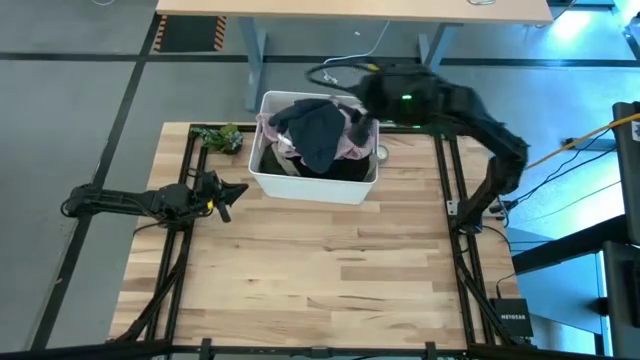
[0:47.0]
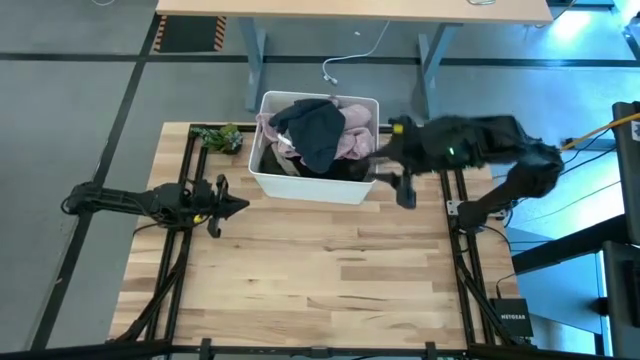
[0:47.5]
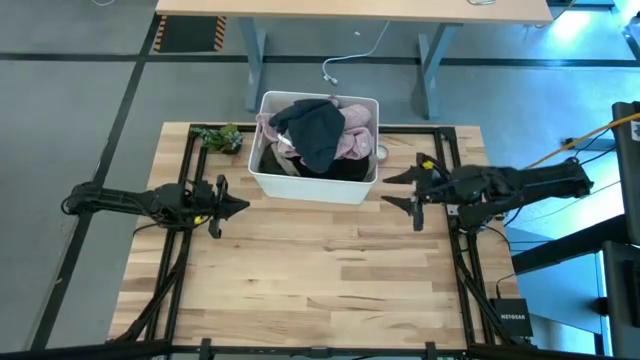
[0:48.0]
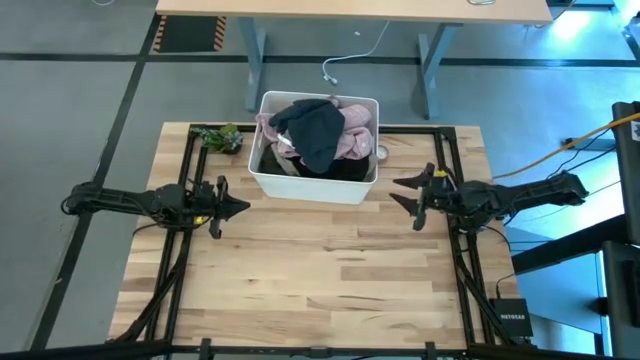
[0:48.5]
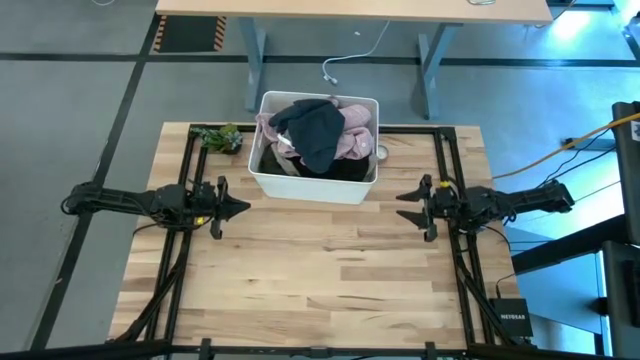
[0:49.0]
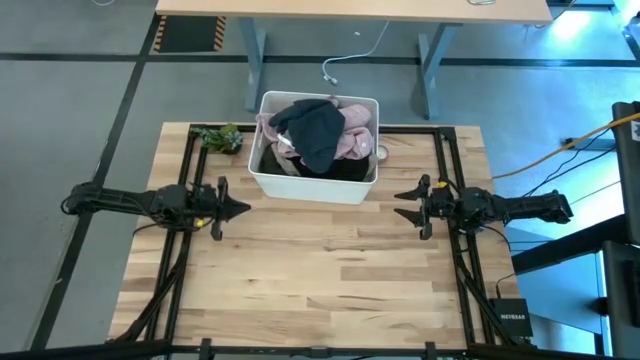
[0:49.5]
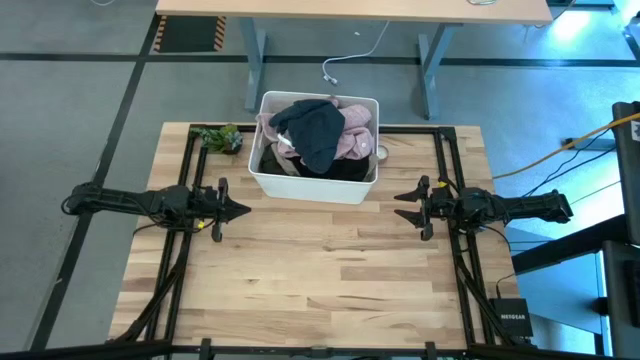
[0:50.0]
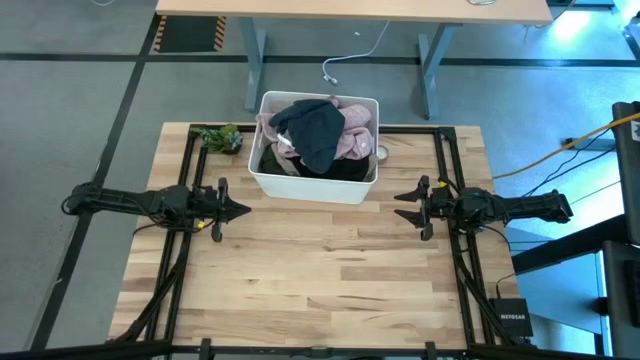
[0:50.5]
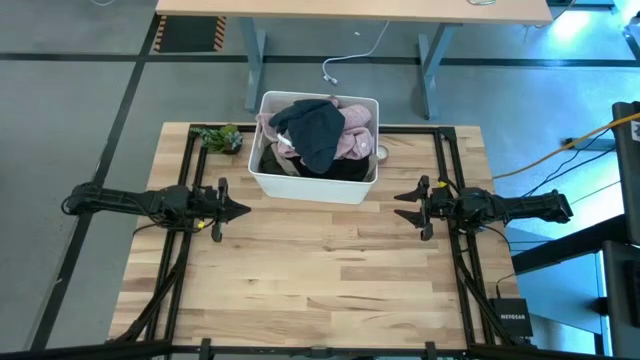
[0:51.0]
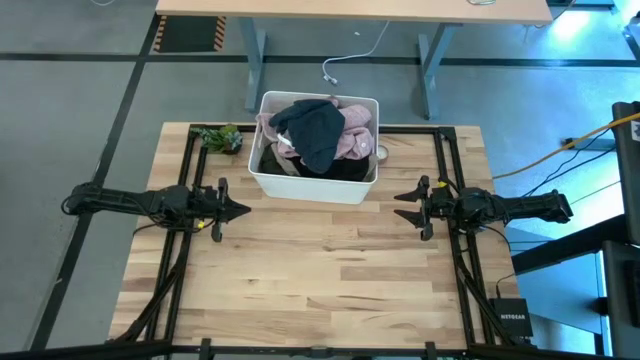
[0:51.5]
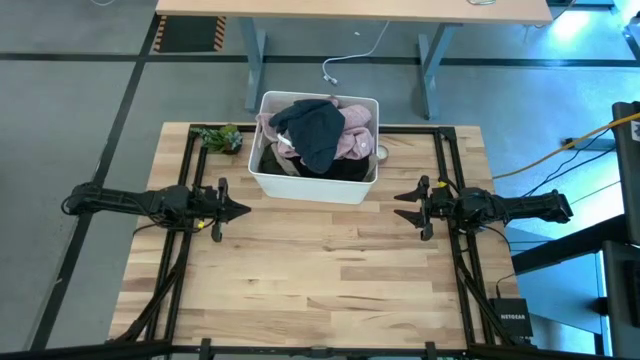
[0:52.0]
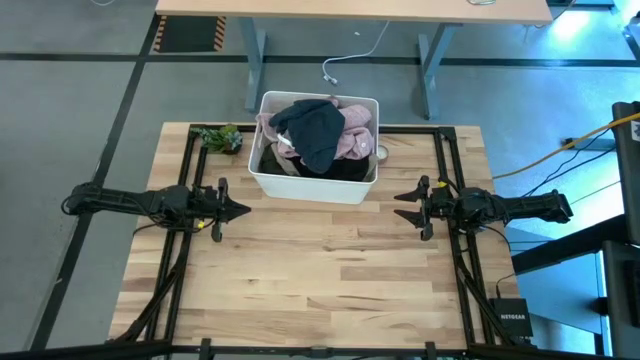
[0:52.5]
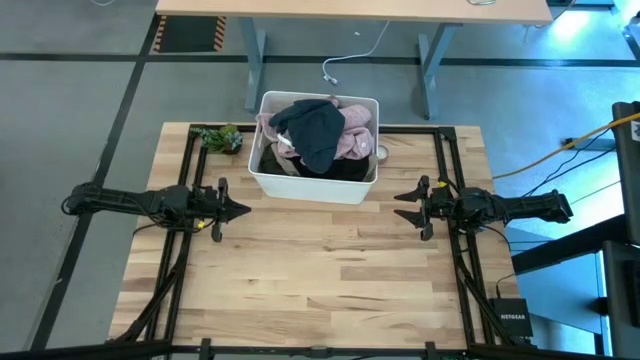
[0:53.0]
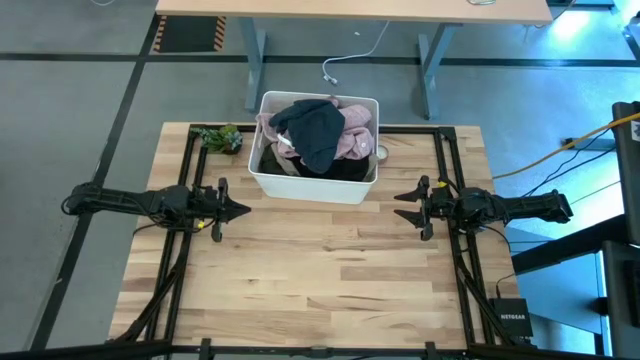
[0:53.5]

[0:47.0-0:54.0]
Task: Sort clothes
Return to Home Position

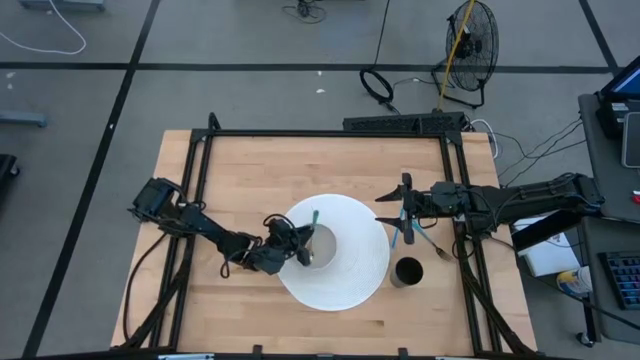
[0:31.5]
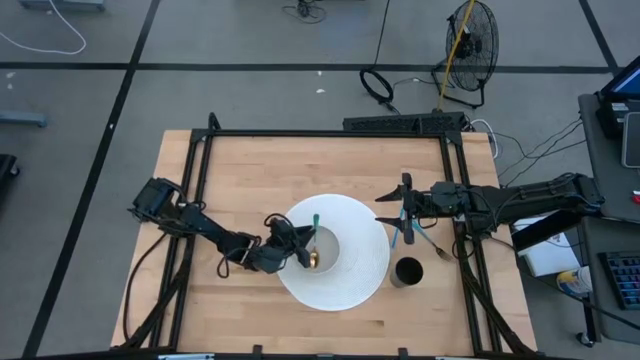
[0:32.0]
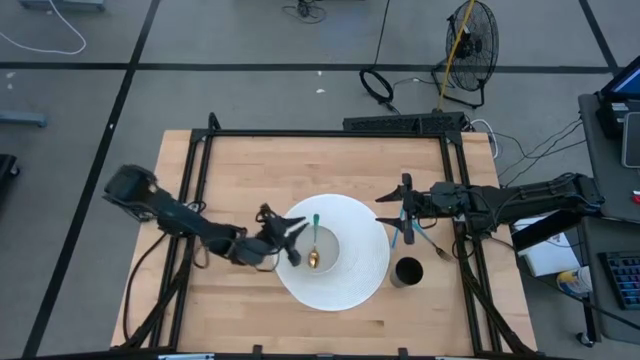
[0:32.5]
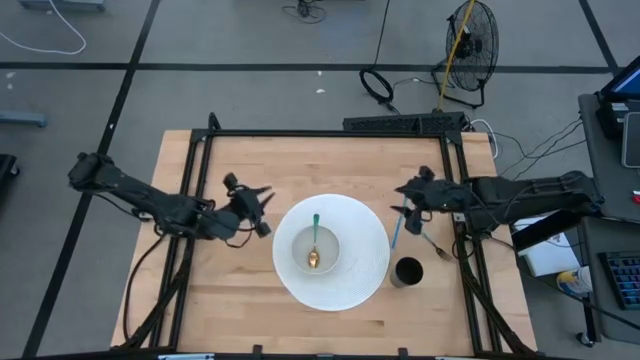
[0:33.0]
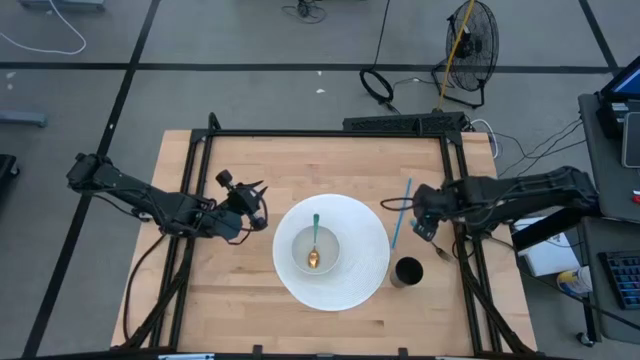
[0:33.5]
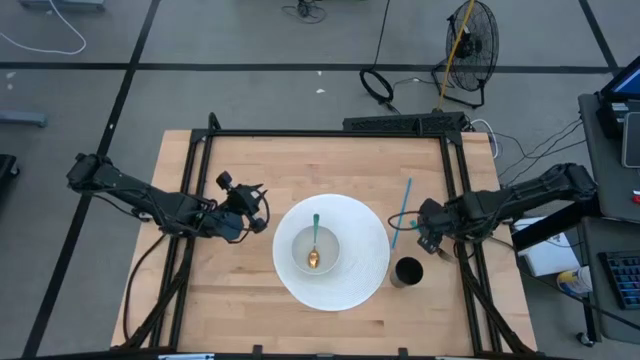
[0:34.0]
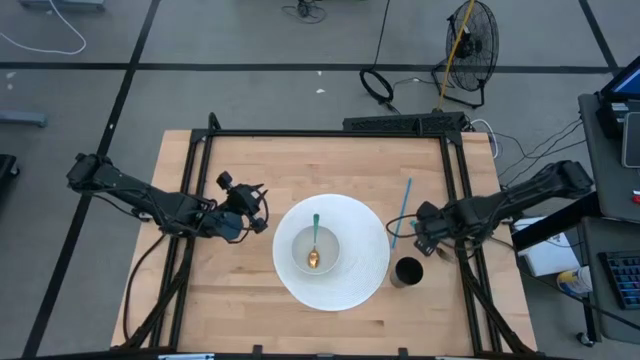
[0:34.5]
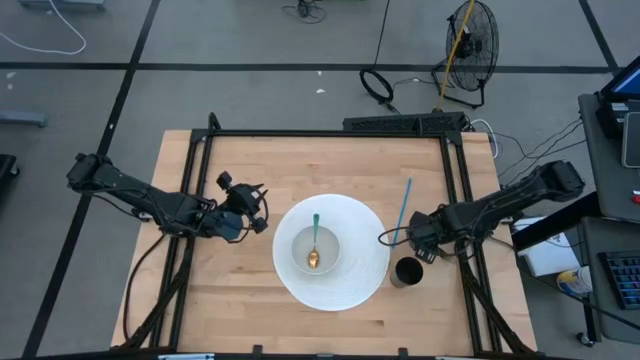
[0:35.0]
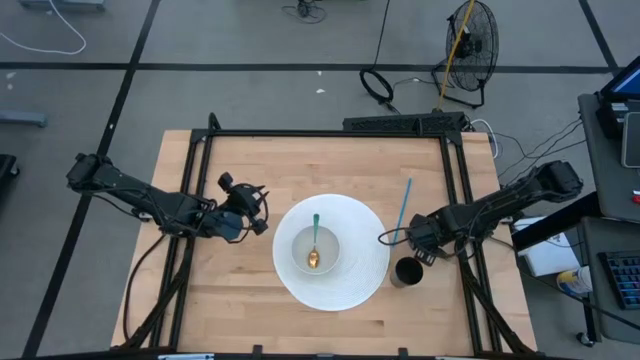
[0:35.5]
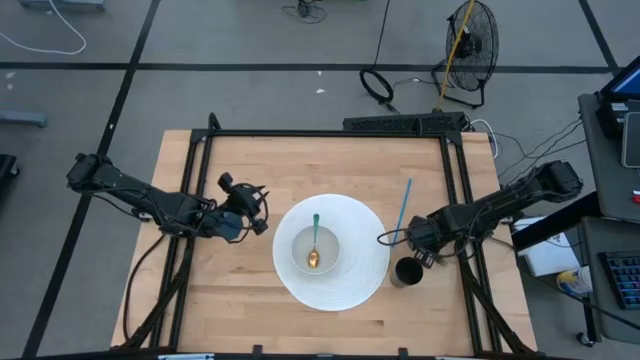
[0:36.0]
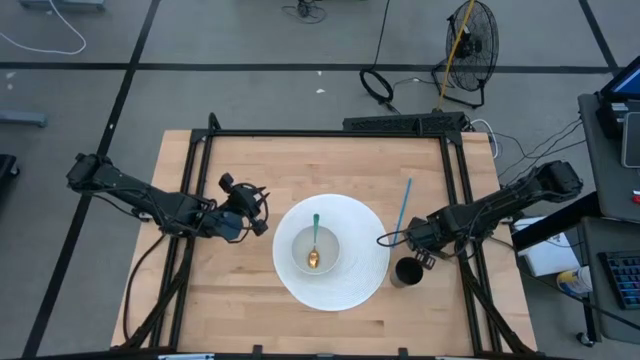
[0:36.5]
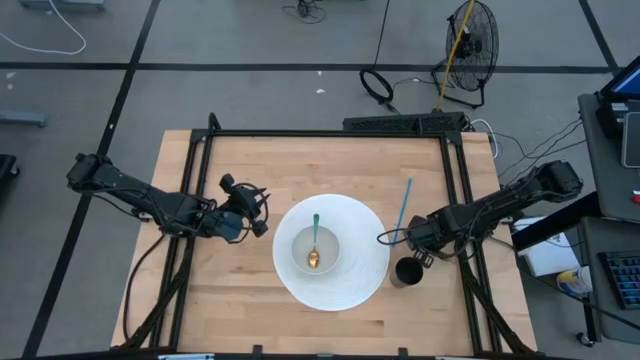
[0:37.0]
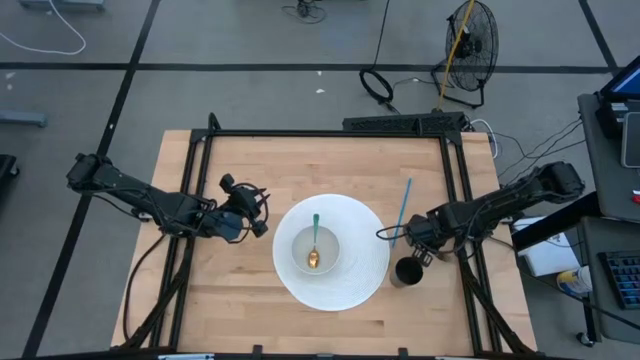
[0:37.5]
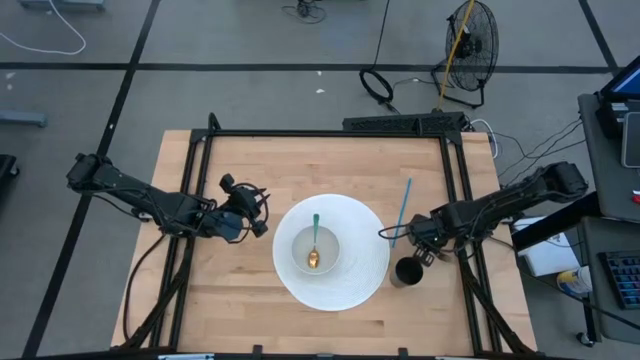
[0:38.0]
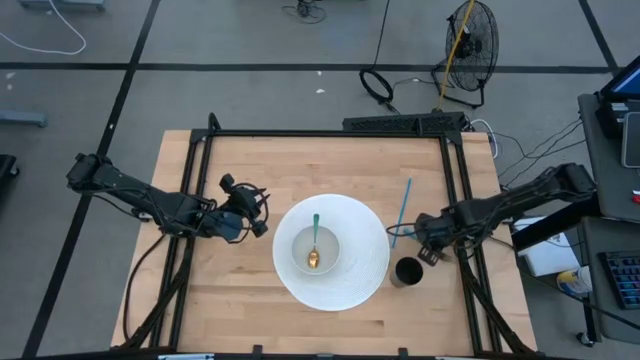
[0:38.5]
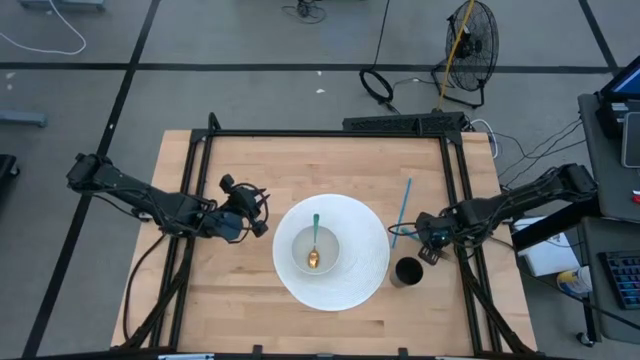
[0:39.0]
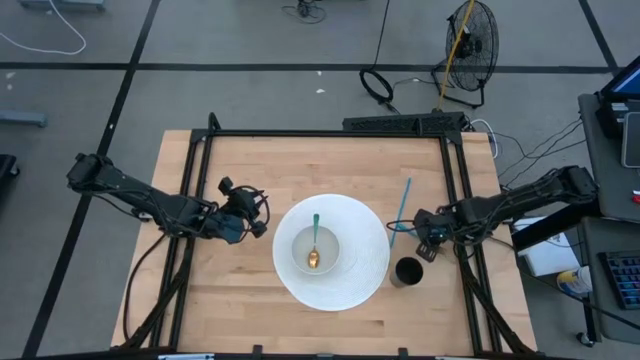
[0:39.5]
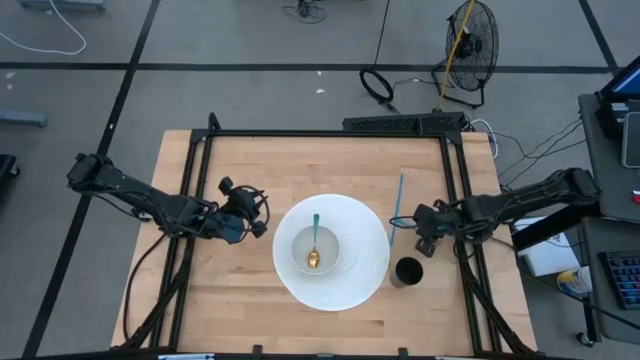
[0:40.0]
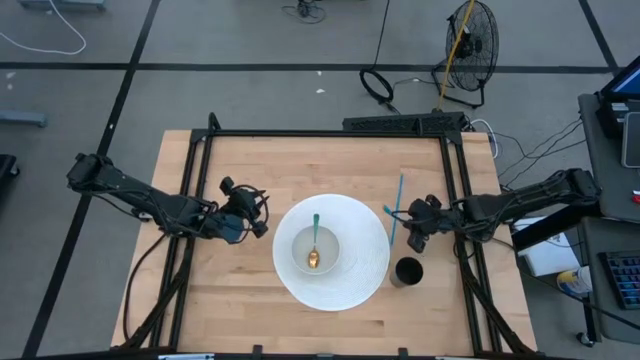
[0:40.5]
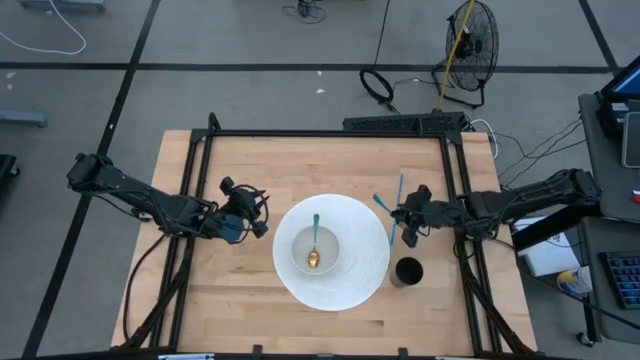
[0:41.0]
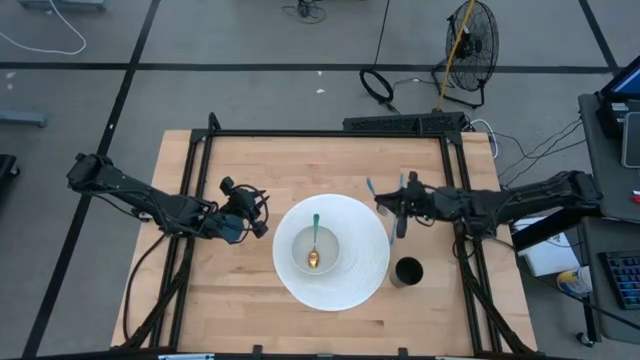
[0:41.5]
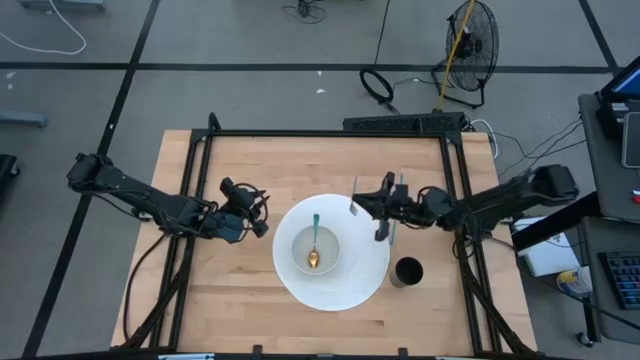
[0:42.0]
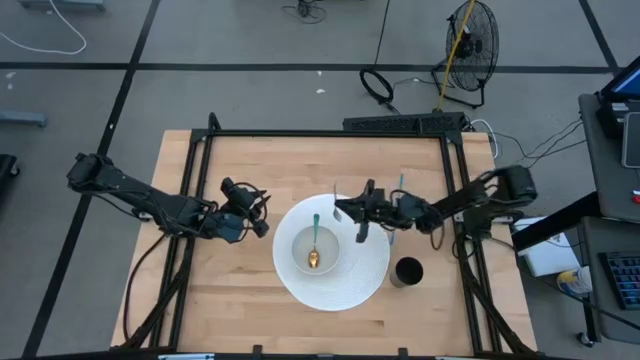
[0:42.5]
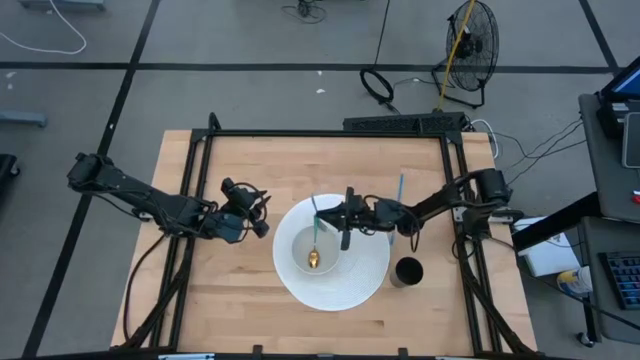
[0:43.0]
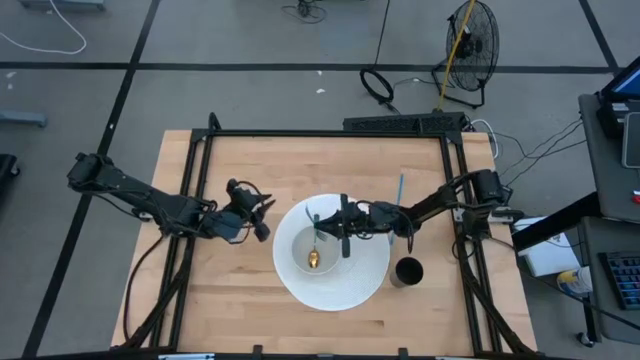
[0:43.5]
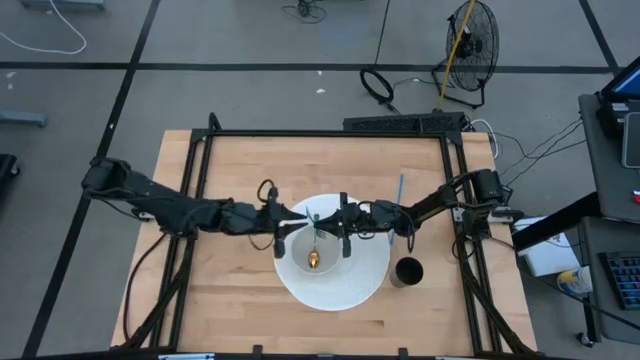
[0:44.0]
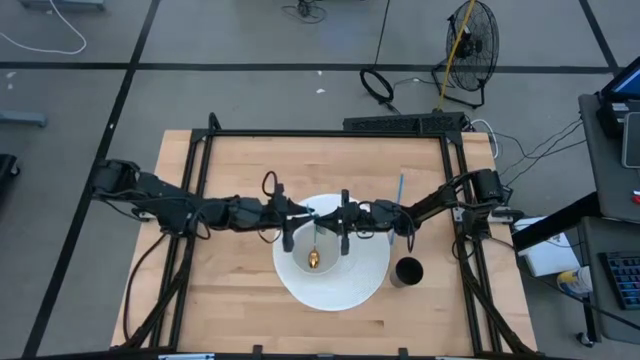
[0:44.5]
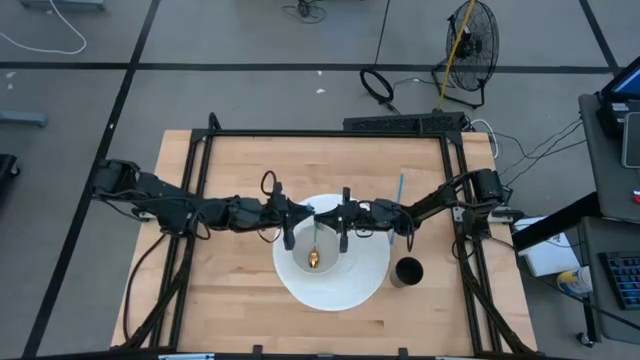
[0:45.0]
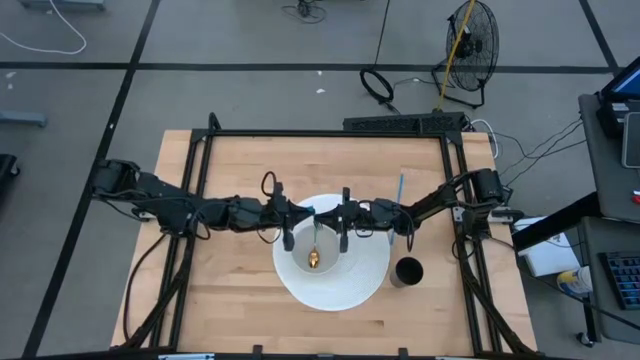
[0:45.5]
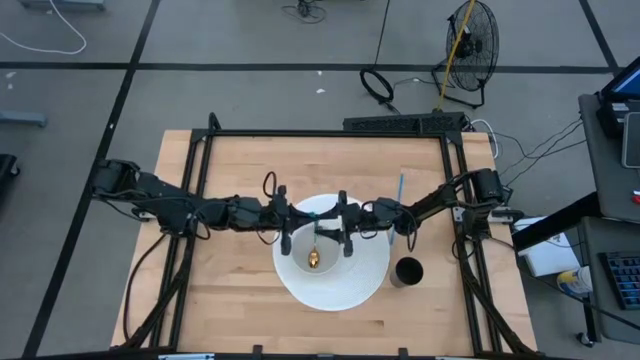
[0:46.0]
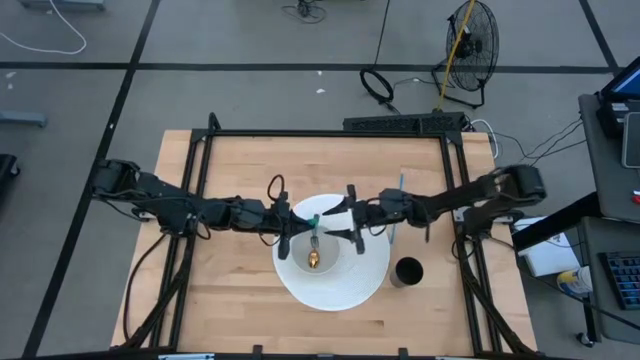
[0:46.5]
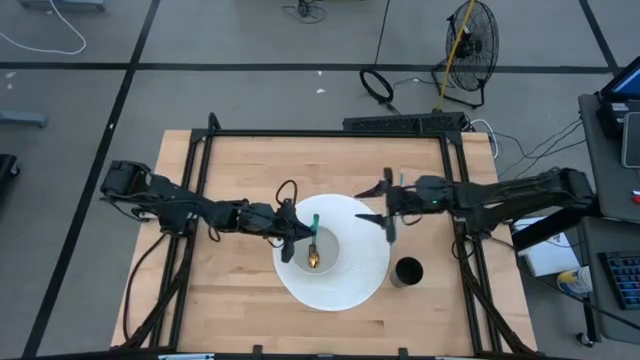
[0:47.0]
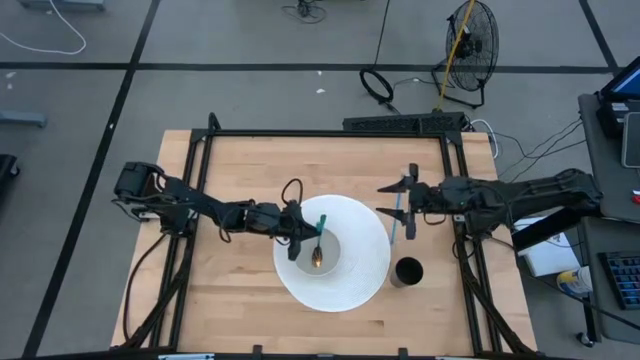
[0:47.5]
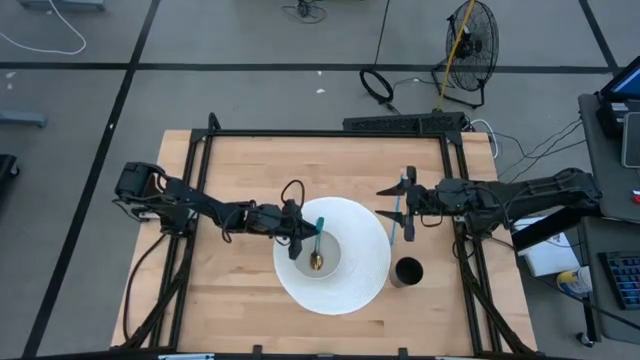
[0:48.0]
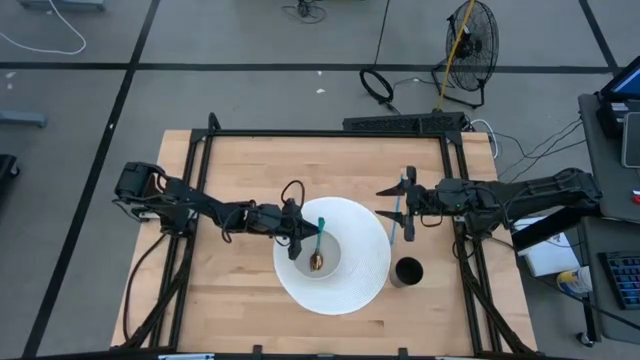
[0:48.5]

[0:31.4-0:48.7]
Task: Pick & Place Utensil
Put the blue fork into the white bowl on the white mat
